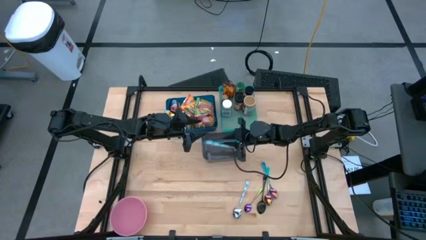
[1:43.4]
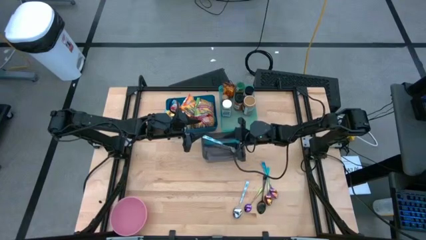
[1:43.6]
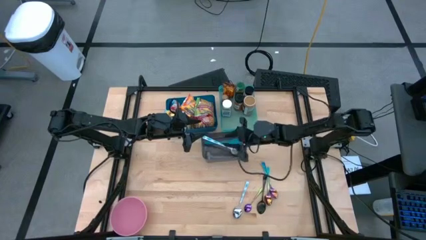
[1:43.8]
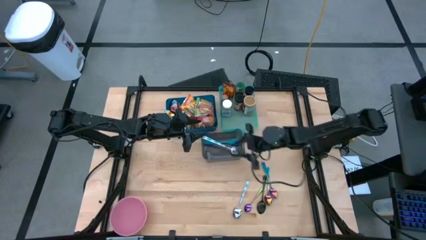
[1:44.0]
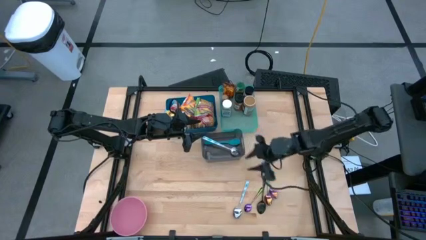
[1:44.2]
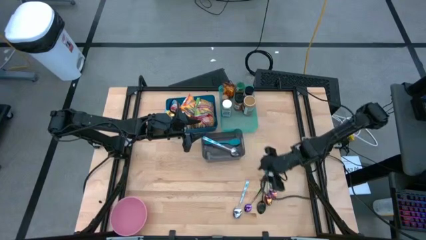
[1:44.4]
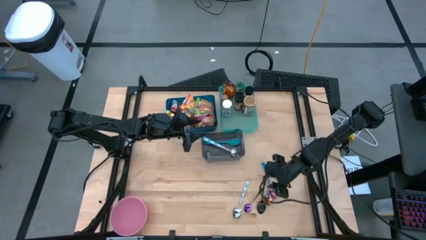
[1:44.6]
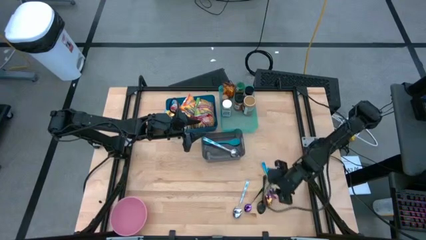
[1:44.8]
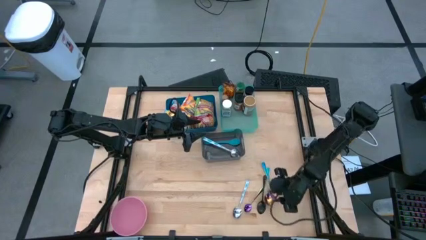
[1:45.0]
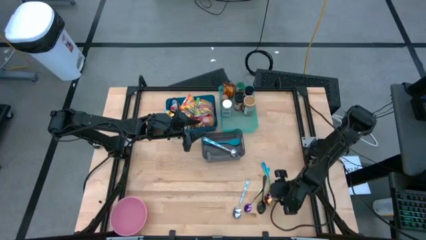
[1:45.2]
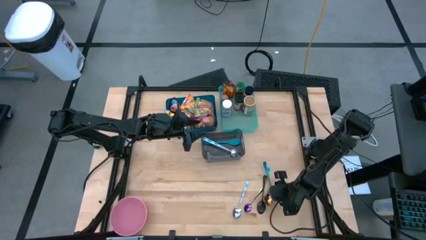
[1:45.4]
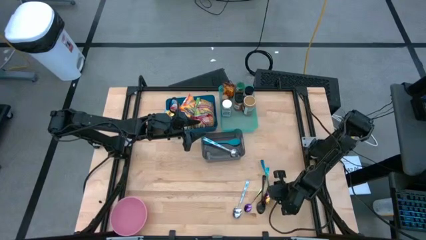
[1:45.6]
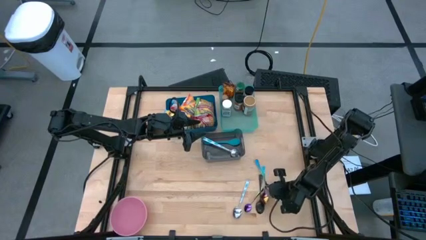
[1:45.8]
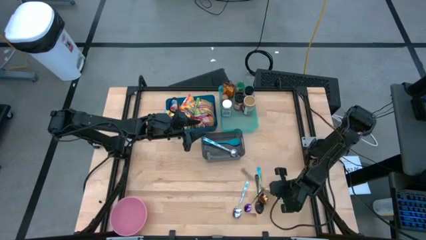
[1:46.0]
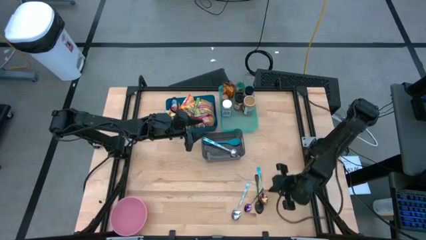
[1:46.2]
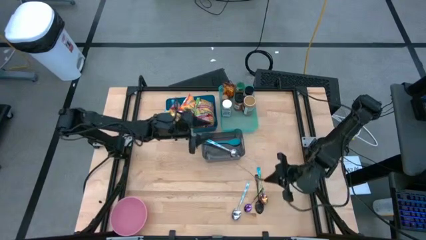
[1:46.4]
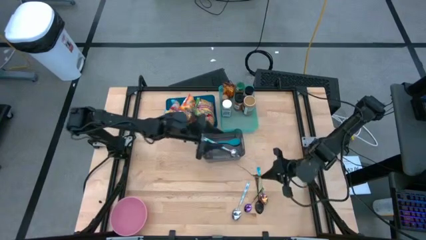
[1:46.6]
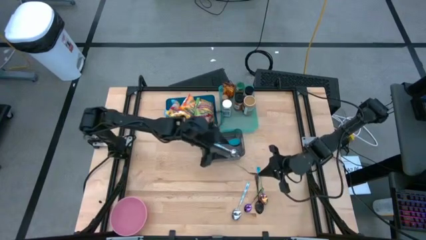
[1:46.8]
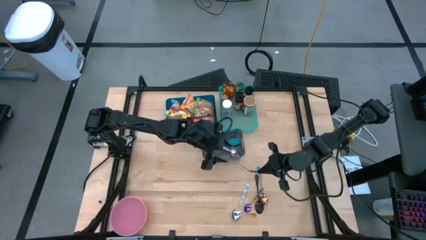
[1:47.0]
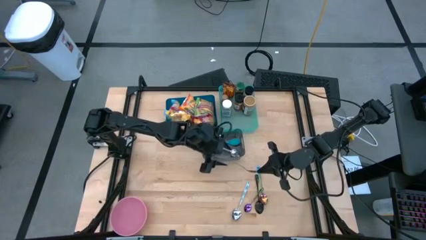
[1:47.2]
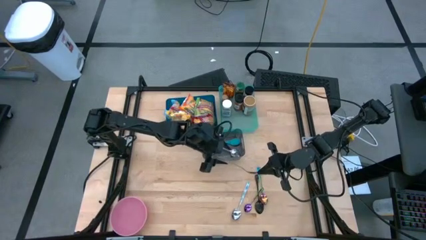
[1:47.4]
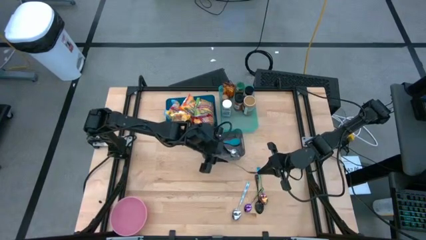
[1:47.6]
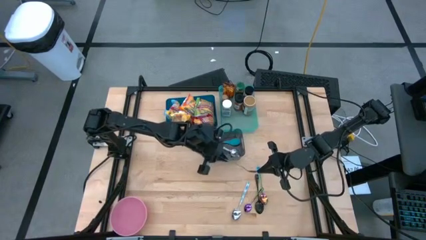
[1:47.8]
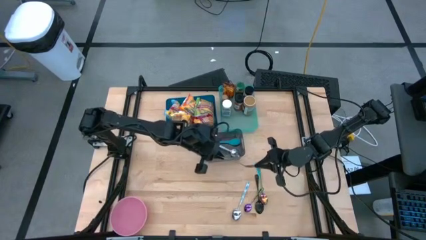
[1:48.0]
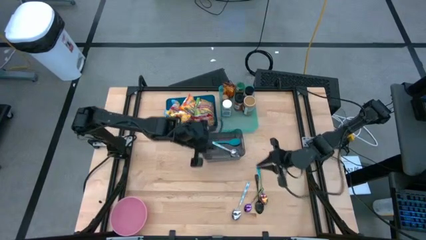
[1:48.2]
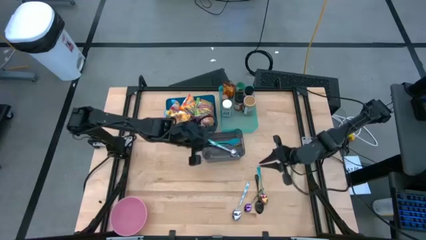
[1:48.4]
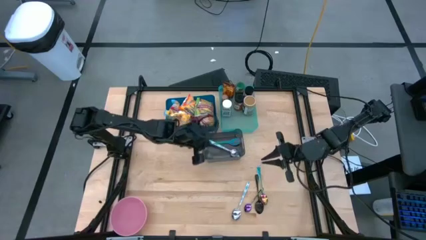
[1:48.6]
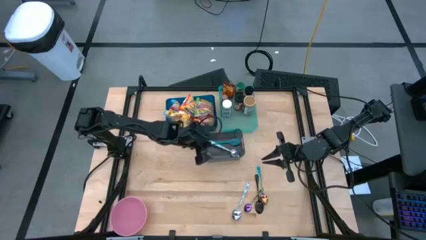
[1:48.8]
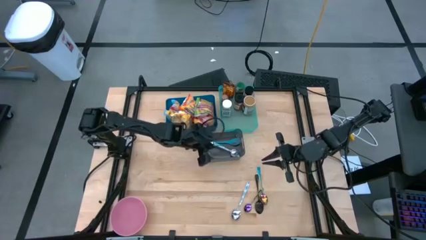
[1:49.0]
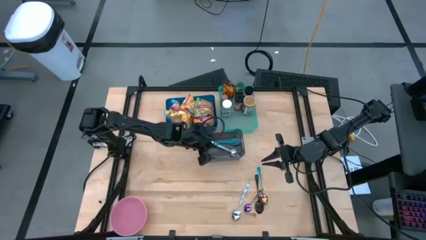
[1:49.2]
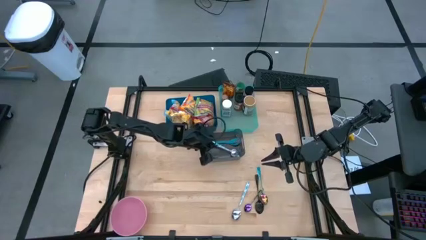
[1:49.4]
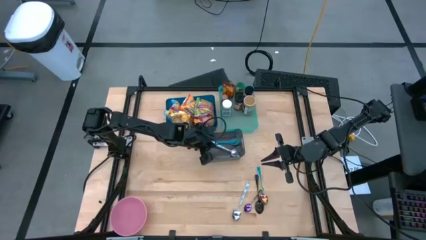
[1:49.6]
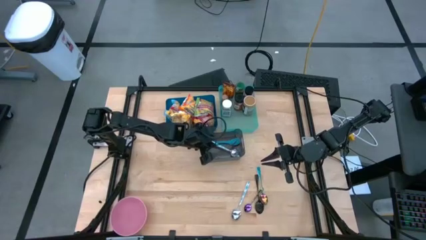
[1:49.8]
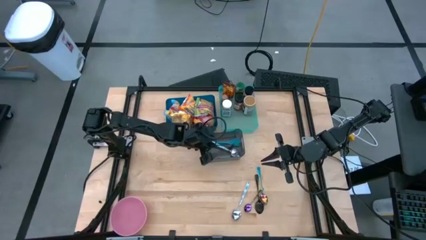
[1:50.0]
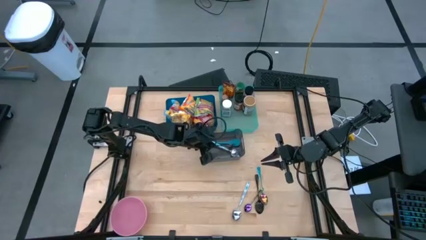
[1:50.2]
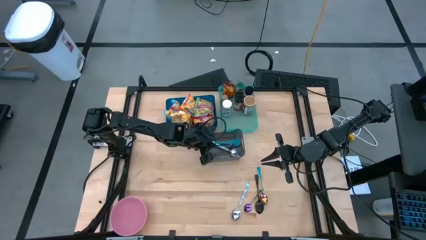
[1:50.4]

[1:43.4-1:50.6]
Task: Pick & Place Food Item
Put the violet spoon into the black bin

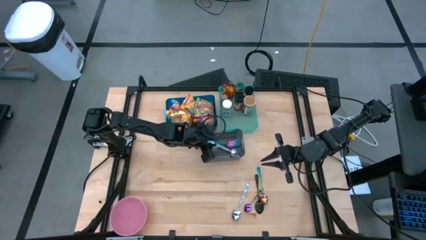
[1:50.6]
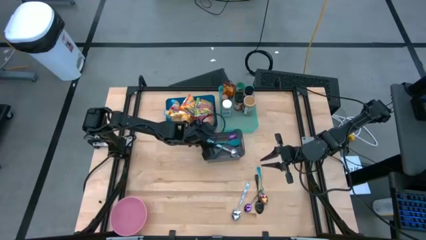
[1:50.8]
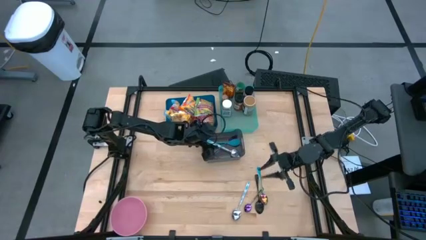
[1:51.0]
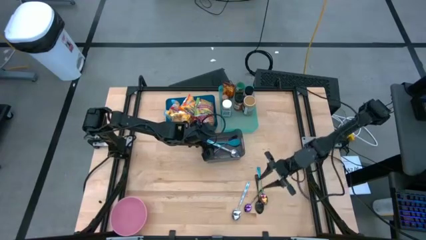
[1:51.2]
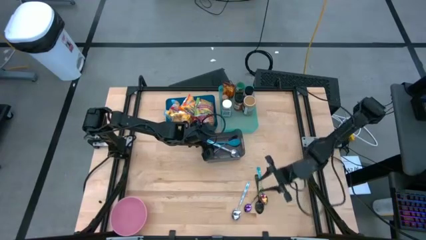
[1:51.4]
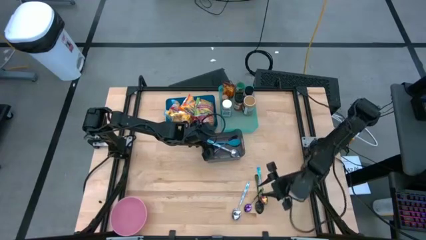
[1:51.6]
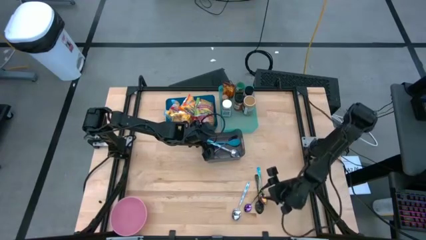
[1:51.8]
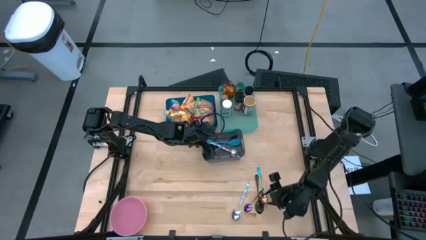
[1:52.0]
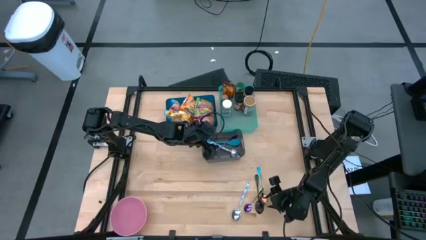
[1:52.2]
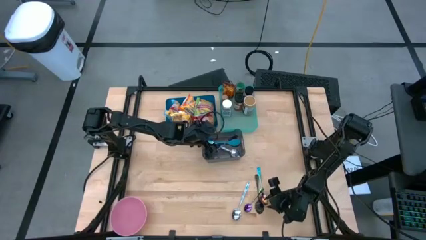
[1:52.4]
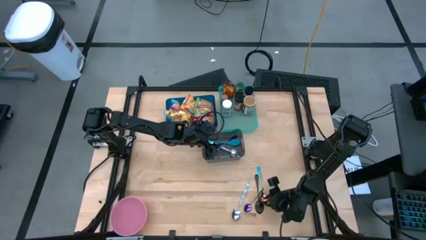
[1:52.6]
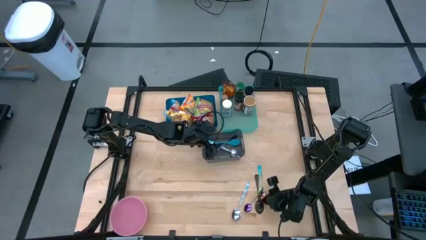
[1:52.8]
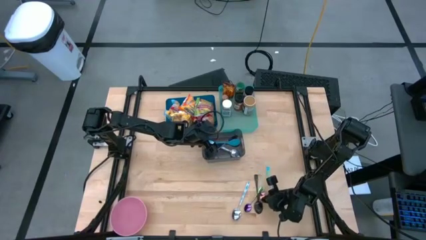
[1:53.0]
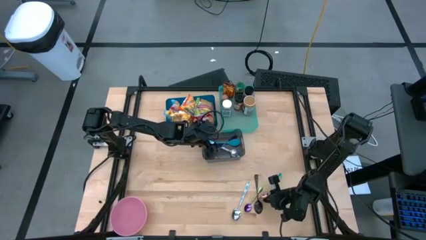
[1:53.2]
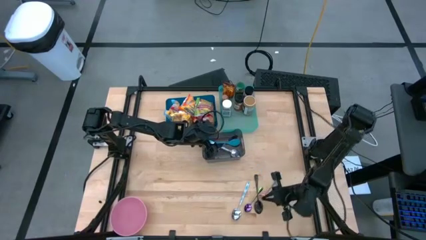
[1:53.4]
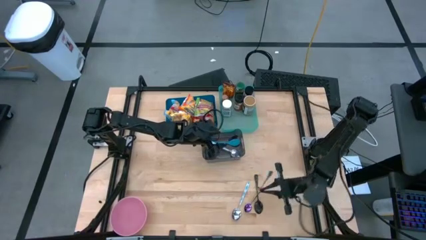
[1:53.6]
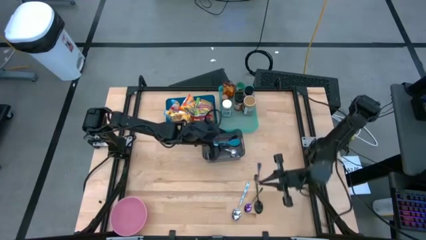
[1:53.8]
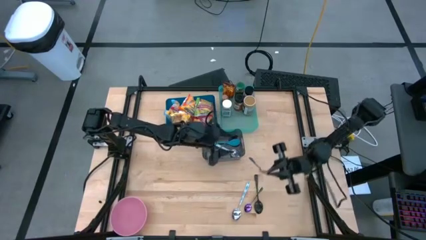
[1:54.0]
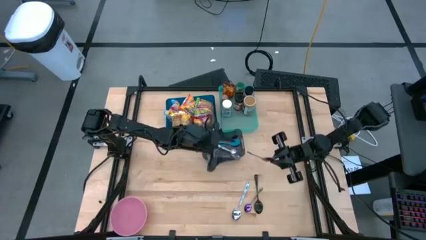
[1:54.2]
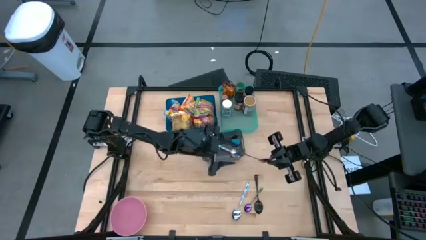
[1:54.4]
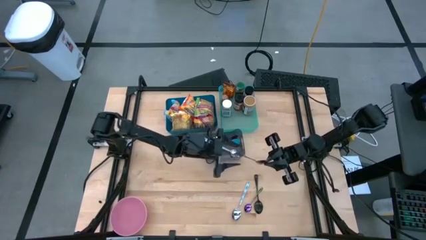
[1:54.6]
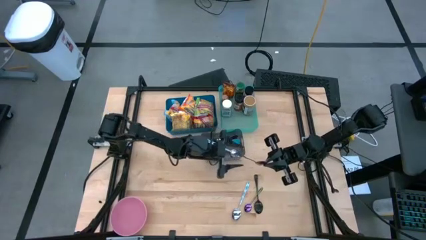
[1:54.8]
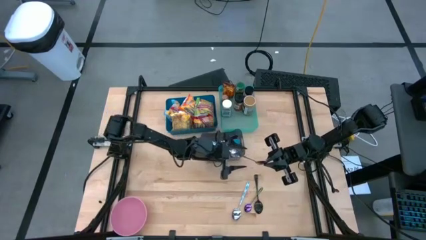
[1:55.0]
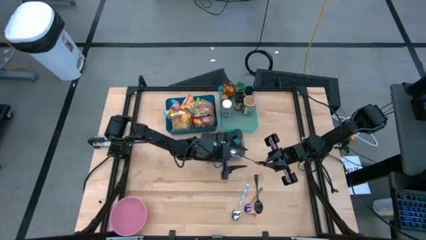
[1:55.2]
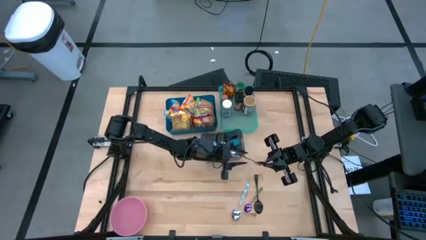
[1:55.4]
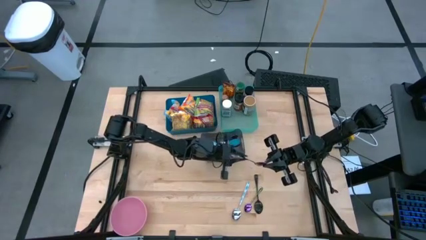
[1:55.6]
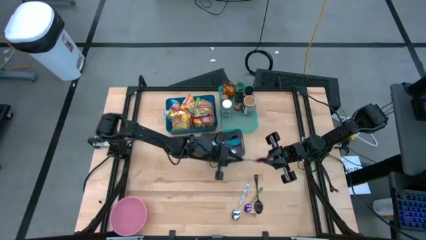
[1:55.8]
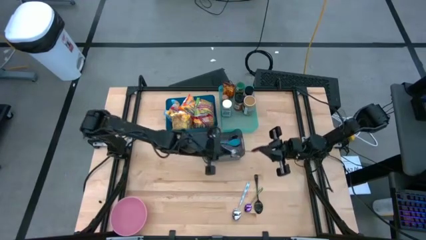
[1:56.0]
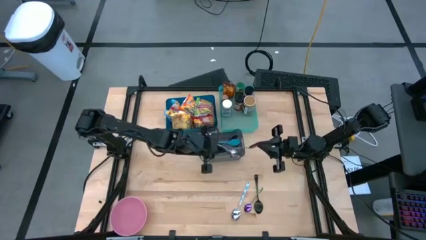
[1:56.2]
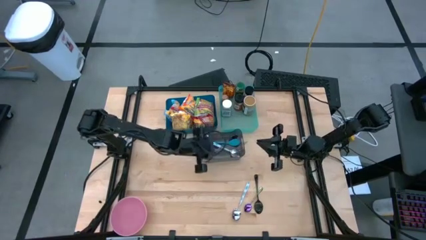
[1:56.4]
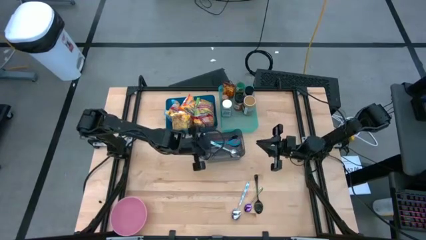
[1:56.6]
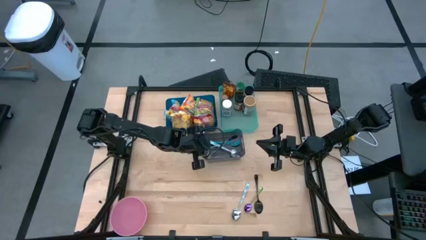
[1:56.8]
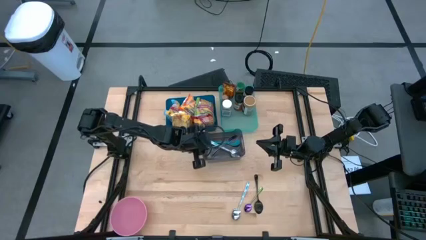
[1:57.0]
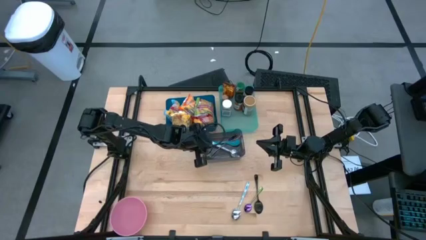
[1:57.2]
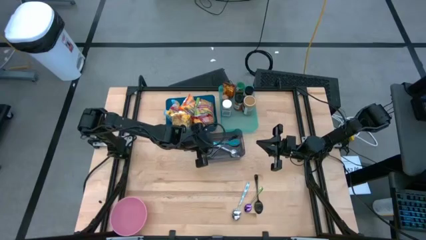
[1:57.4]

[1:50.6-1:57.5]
Put the violet spoon into the black bin

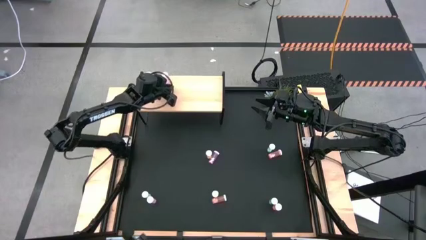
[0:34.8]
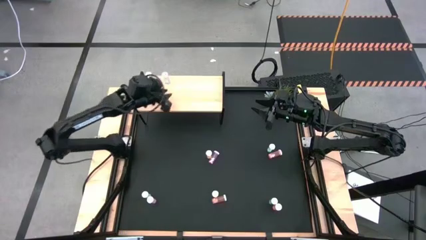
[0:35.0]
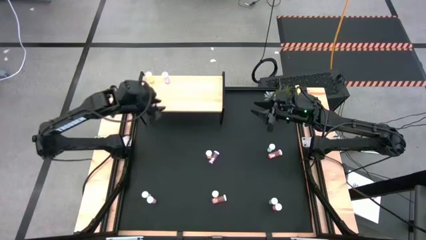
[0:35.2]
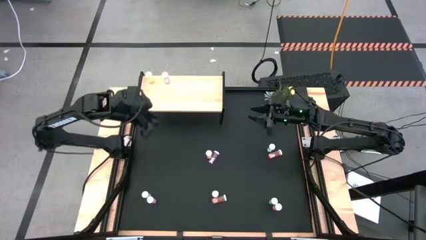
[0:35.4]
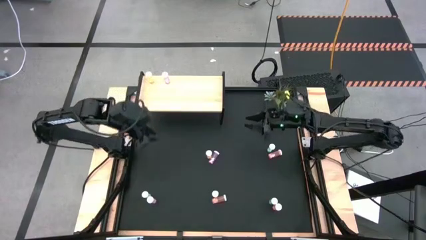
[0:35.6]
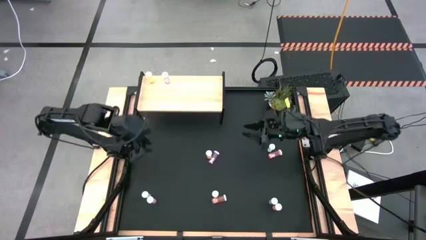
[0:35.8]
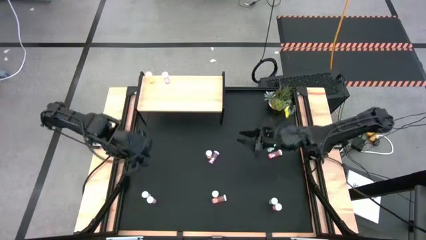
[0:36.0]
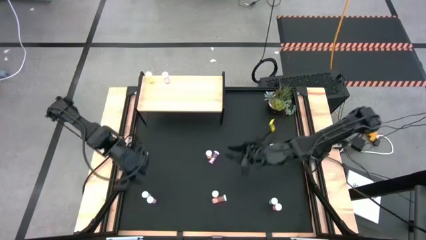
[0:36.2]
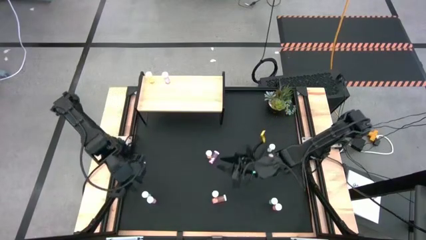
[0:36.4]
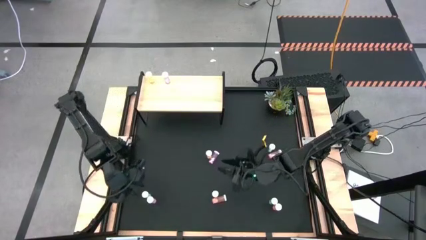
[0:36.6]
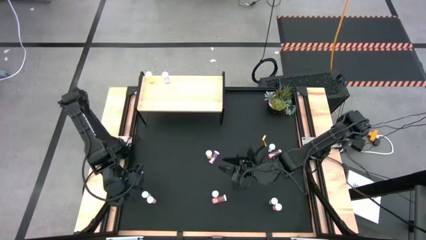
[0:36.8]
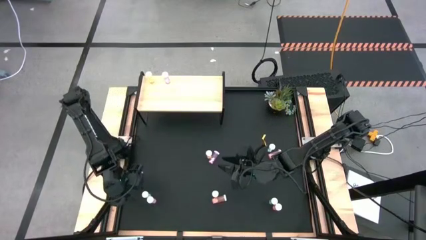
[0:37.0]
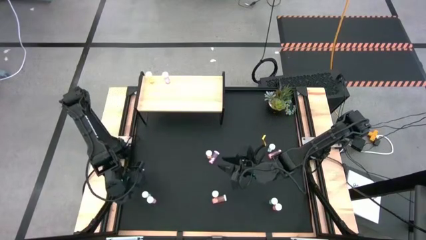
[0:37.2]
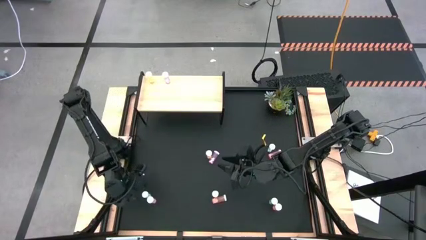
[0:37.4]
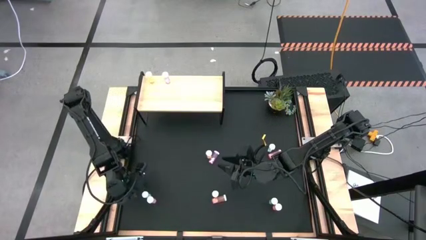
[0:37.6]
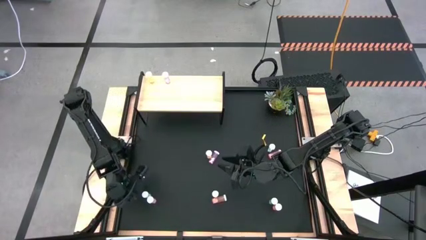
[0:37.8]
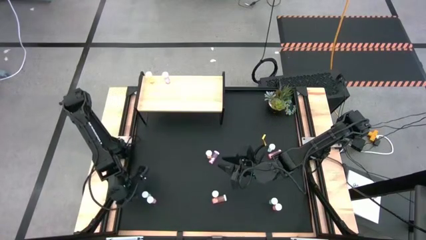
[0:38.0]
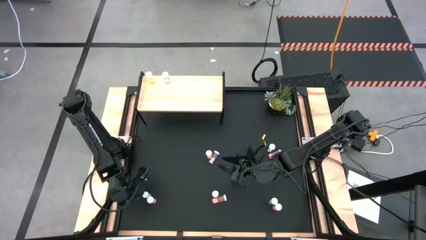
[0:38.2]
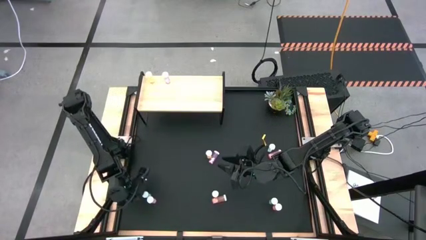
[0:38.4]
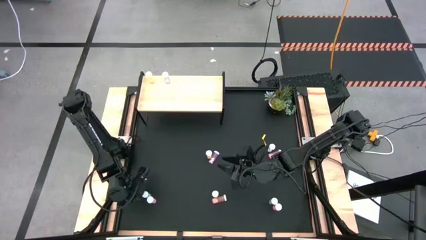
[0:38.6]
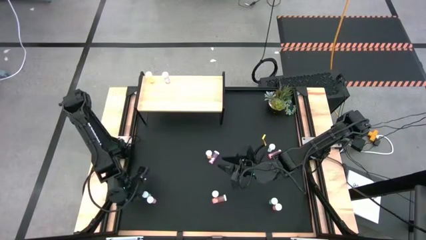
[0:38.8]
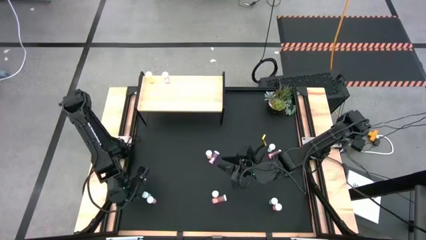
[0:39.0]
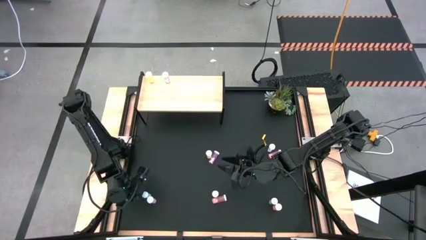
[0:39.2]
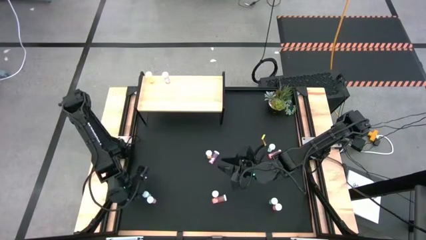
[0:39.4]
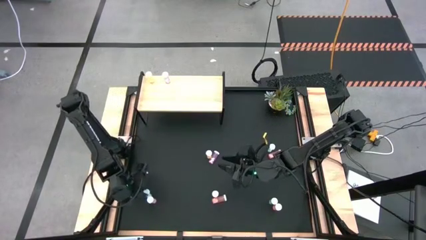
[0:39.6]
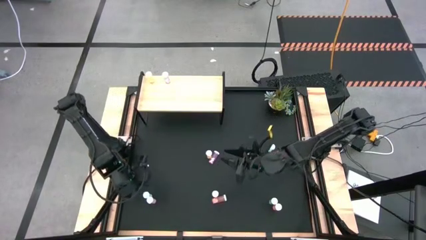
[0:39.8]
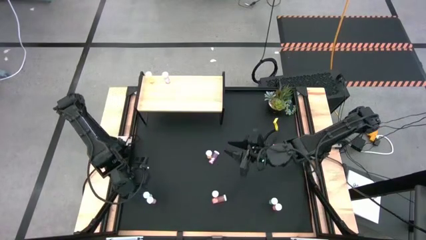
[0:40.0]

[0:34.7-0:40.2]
Task: Pick and place medicine bottles onto shelf by color
Put the bottom left blue medicine bottle on the shelf
